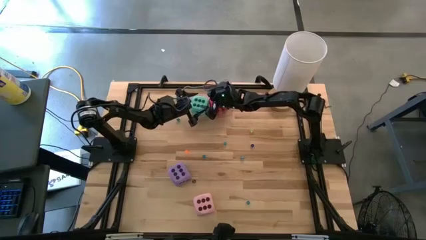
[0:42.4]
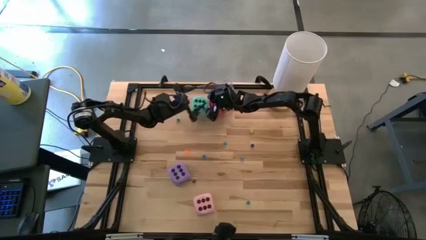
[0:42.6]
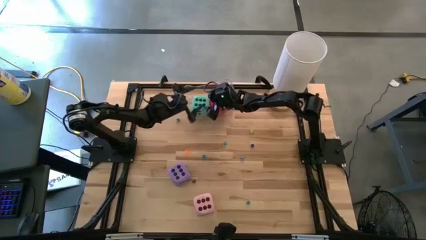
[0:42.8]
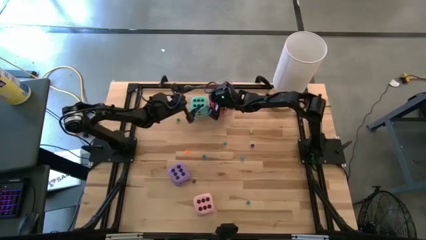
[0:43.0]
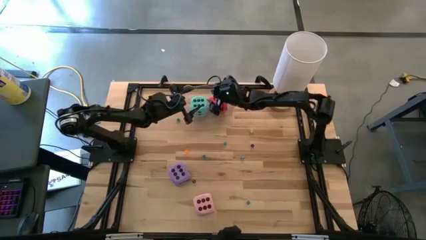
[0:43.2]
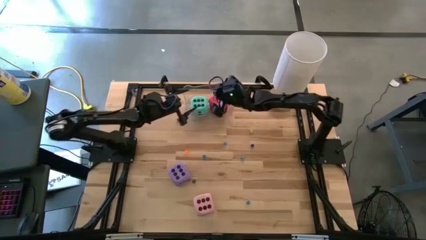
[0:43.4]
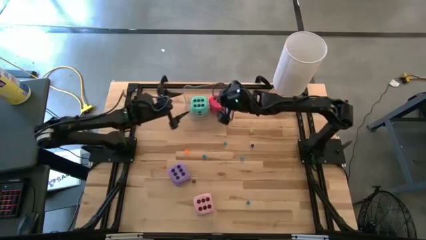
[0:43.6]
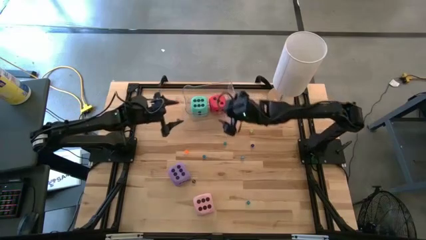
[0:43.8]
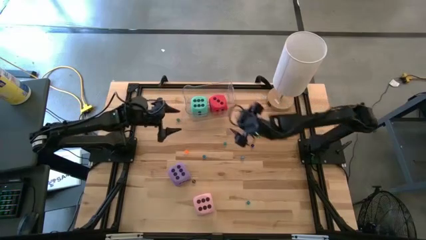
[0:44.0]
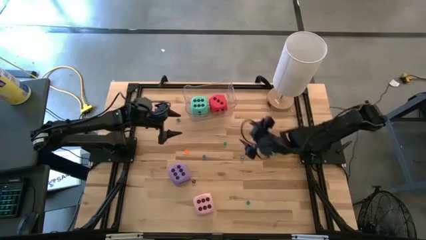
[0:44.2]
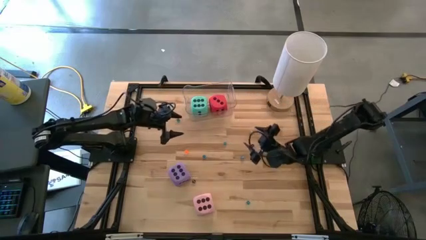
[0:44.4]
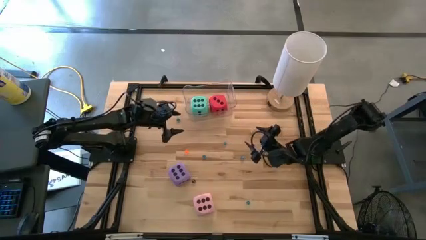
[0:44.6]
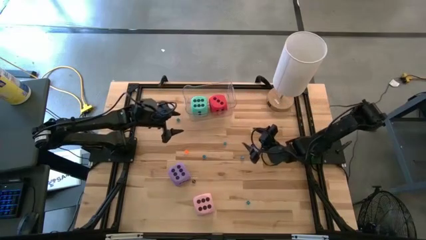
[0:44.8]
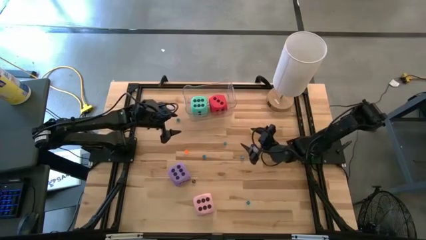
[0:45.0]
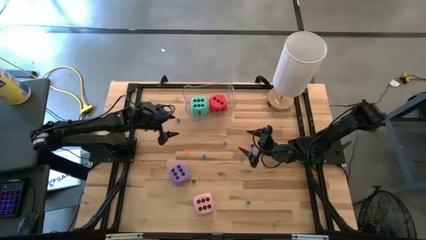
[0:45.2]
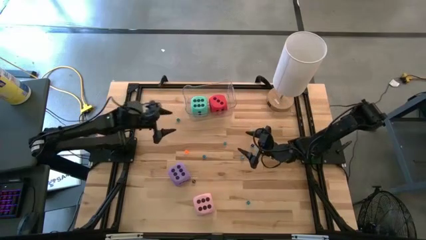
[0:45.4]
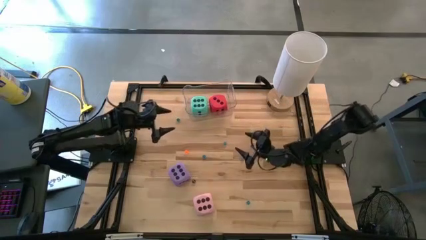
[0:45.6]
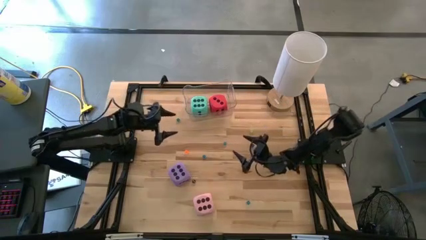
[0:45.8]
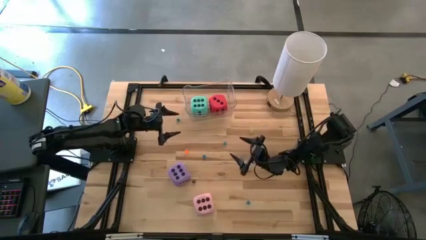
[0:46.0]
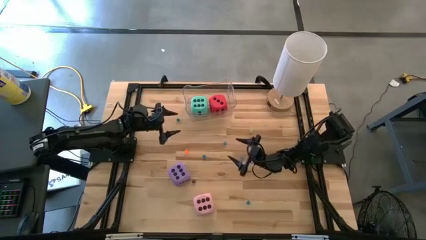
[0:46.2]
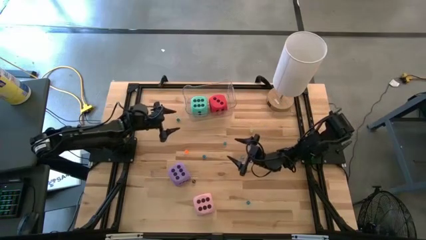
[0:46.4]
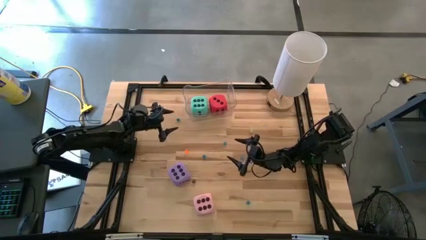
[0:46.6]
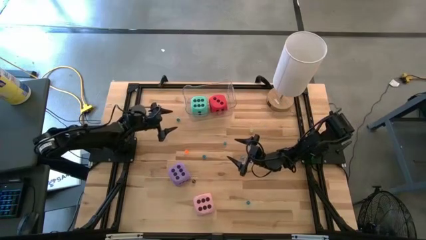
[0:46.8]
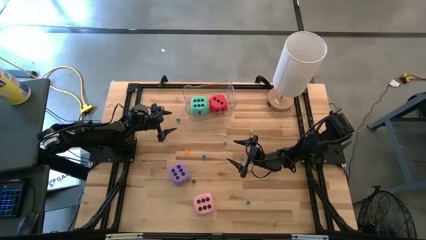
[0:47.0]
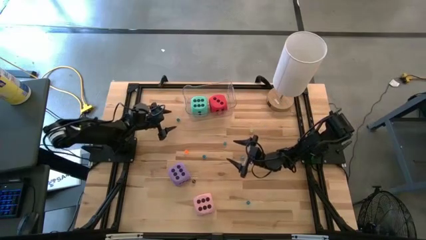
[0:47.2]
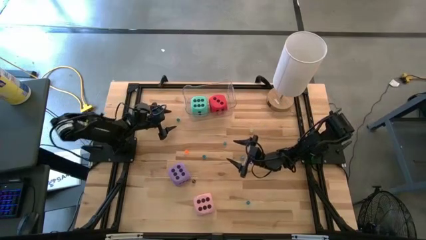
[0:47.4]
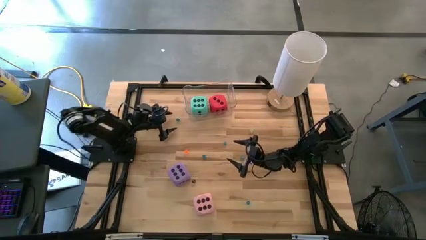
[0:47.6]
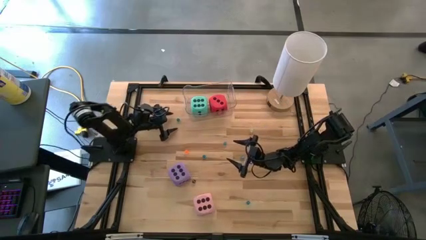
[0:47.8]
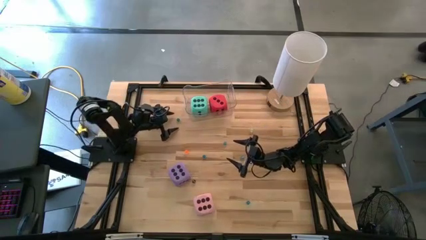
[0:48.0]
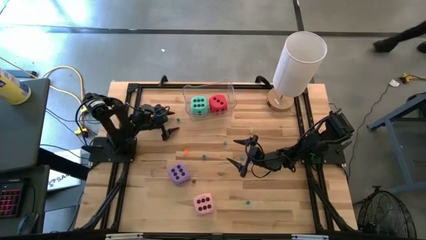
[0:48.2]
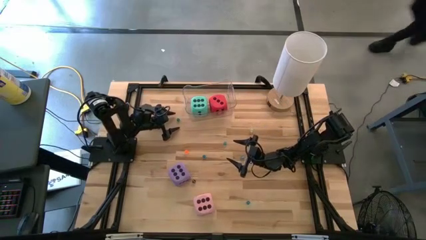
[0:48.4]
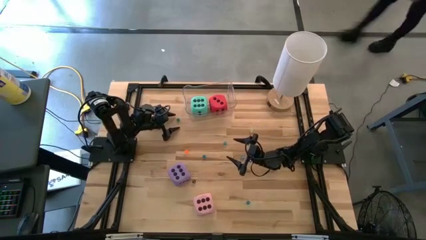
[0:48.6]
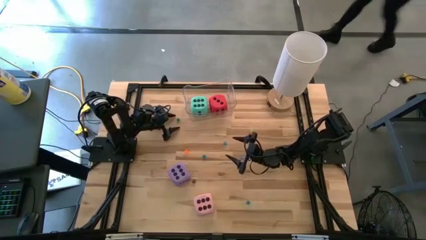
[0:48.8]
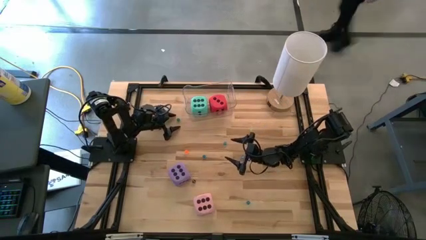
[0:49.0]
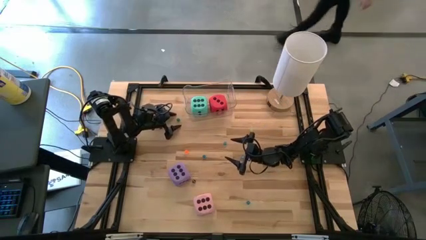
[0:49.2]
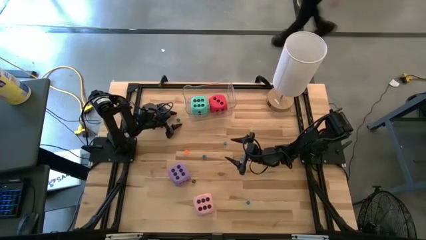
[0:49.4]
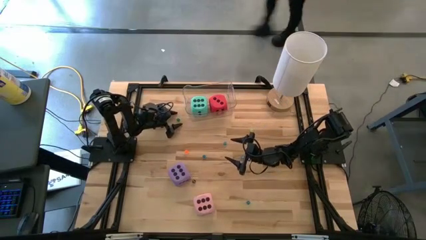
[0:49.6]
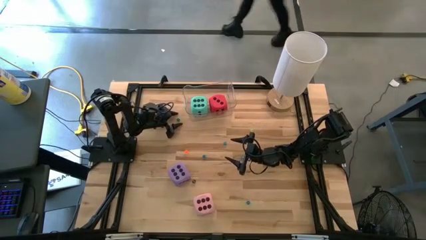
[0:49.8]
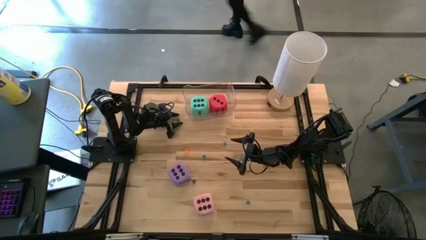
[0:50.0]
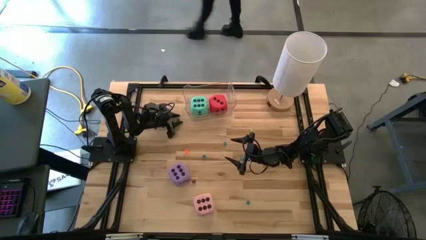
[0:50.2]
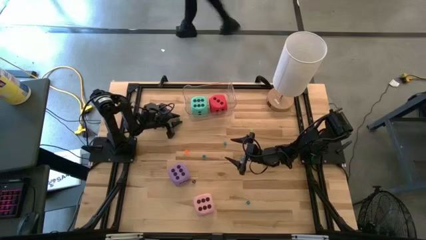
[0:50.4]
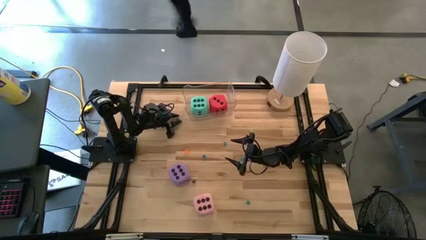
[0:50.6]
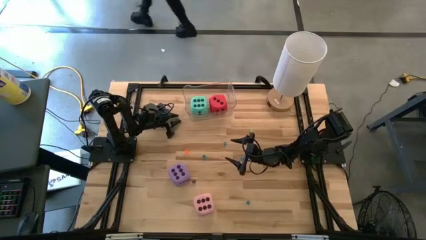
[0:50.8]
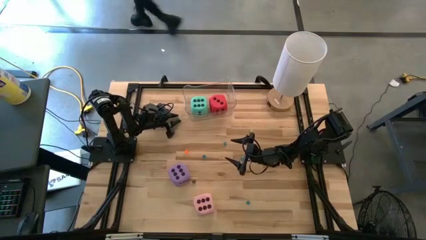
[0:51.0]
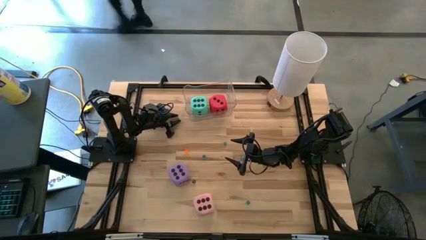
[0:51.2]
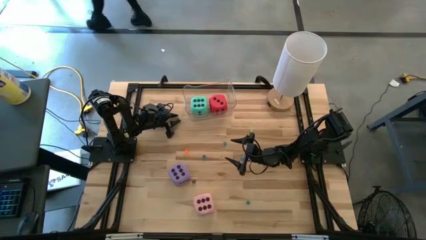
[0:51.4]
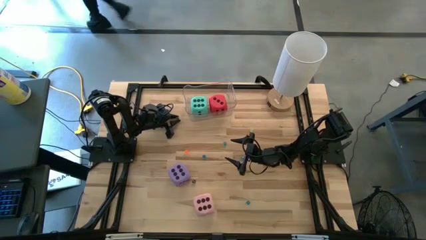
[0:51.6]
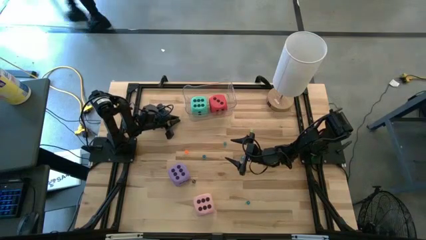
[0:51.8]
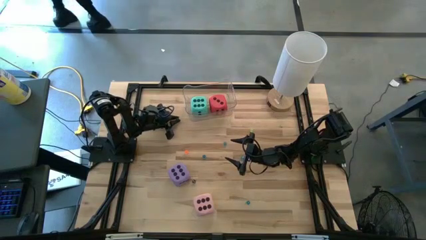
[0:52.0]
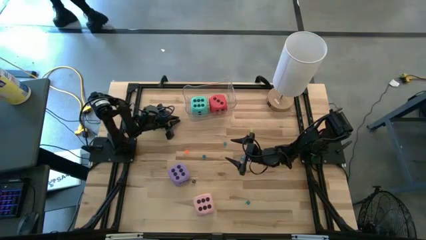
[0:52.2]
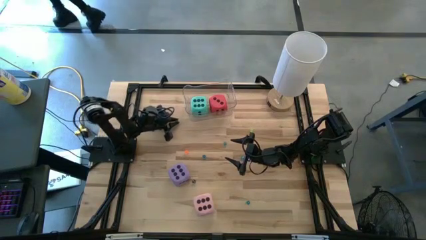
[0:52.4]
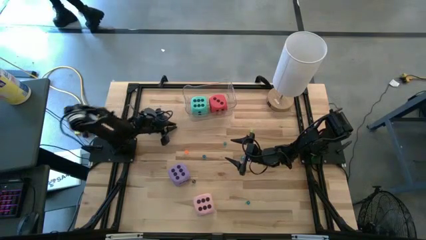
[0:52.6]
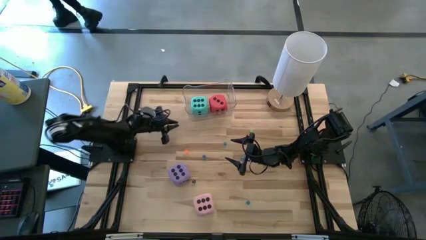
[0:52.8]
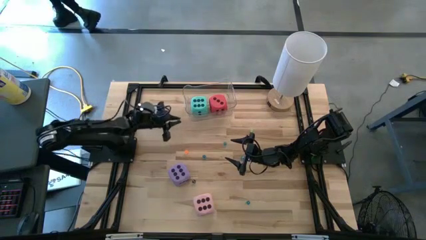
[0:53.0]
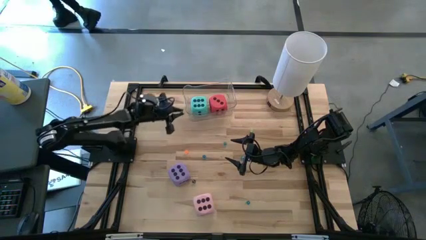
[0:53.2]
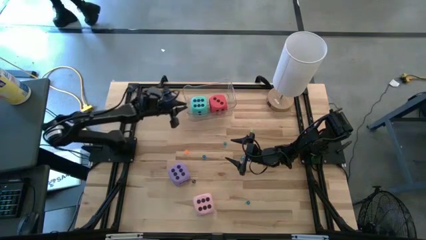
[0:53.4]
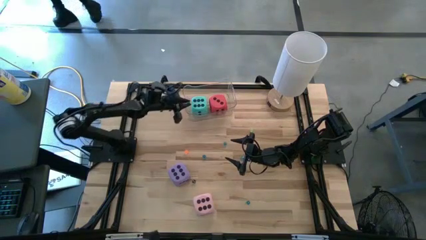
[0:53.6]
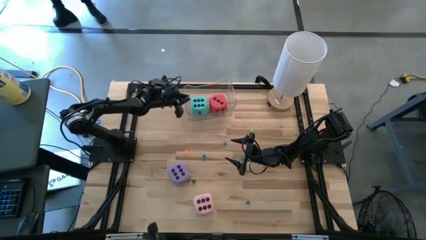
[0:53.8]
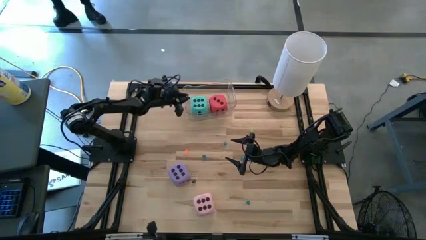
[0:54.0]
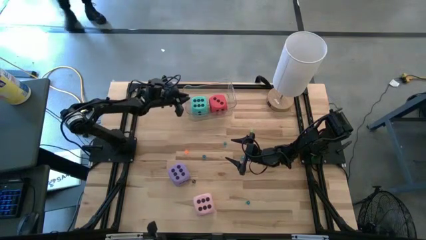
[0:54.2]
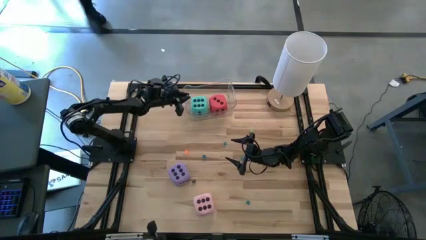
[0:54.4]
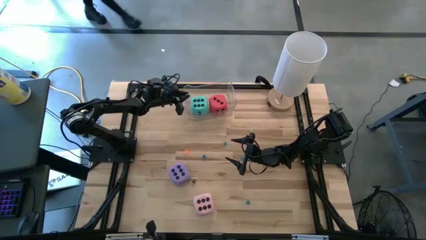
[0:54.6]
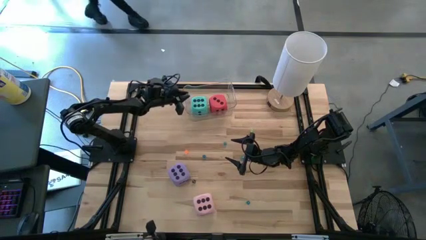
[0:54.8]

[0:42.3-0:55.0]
Task: Pick & Place Dice
Put the small dark green dice in the transparent bin

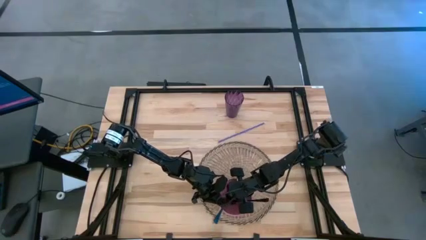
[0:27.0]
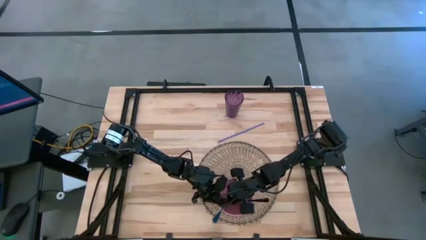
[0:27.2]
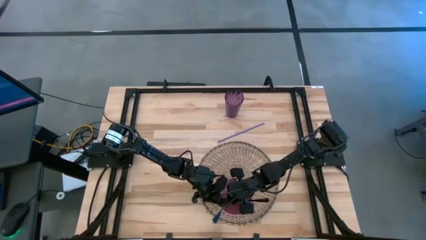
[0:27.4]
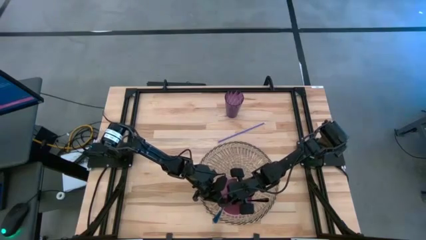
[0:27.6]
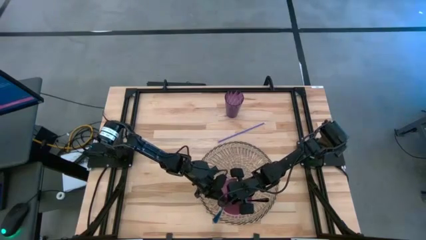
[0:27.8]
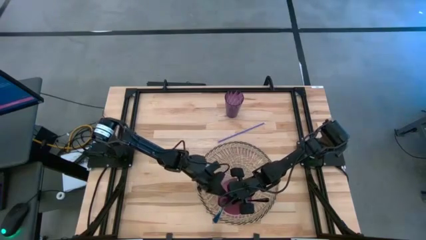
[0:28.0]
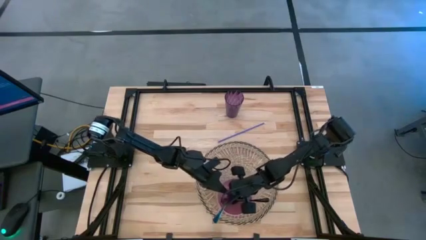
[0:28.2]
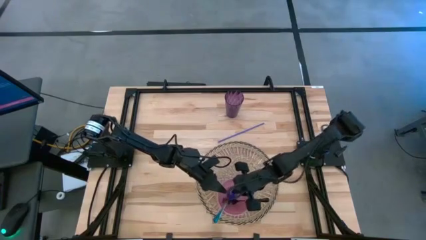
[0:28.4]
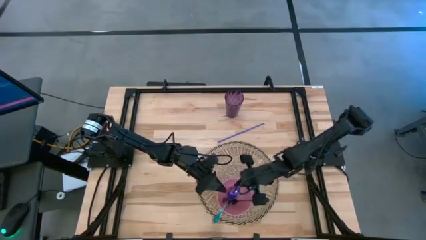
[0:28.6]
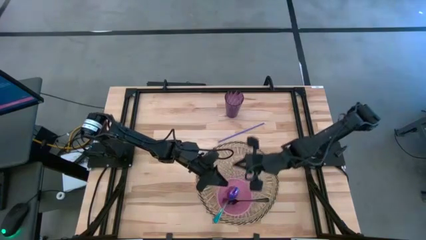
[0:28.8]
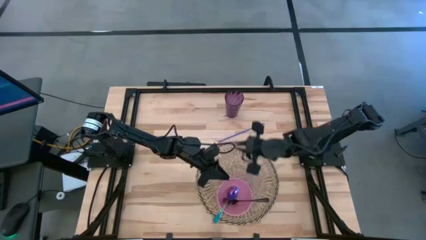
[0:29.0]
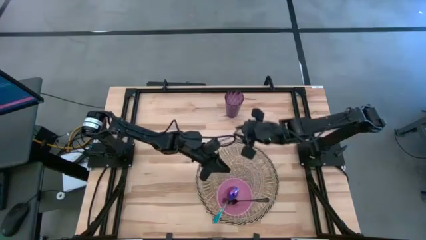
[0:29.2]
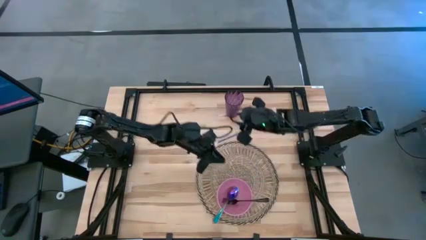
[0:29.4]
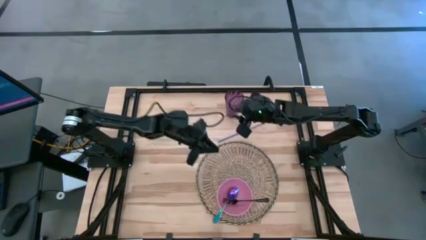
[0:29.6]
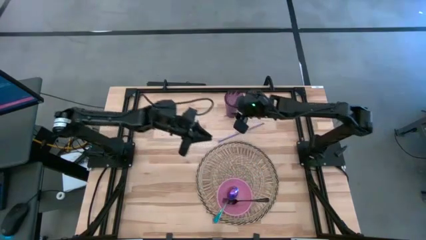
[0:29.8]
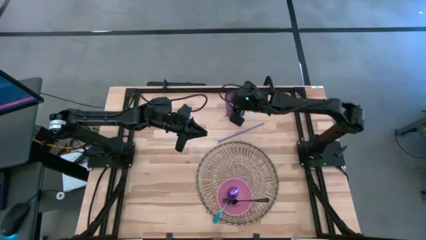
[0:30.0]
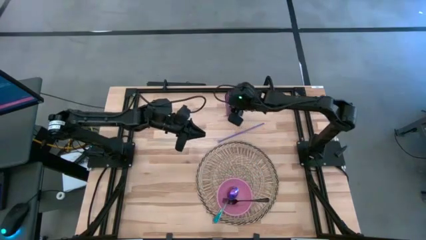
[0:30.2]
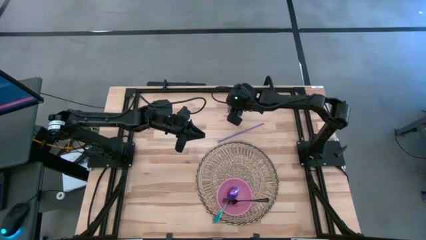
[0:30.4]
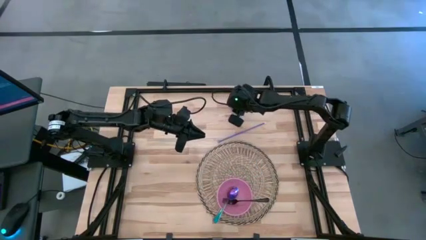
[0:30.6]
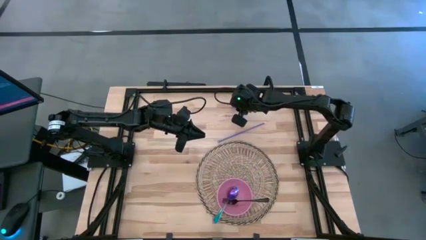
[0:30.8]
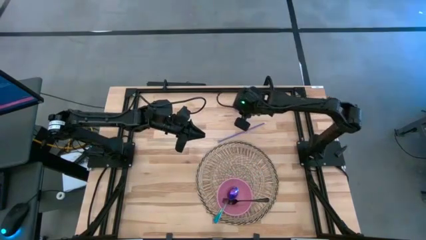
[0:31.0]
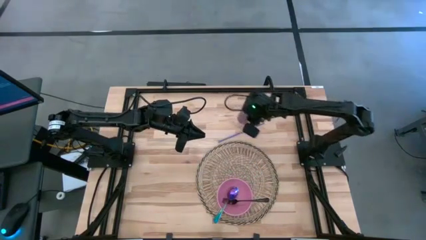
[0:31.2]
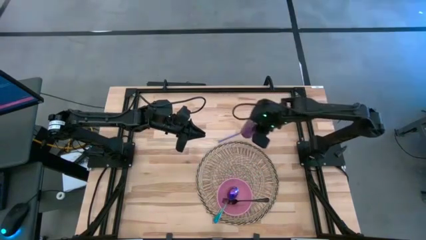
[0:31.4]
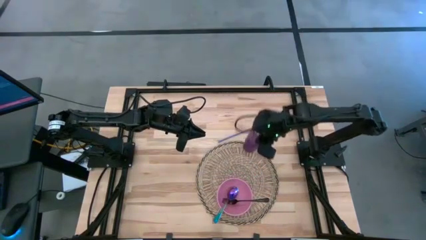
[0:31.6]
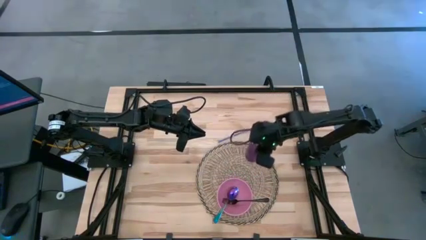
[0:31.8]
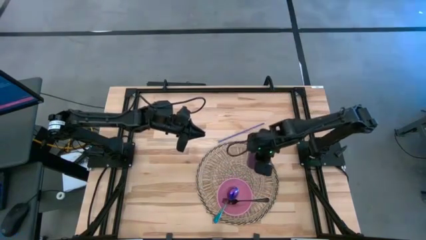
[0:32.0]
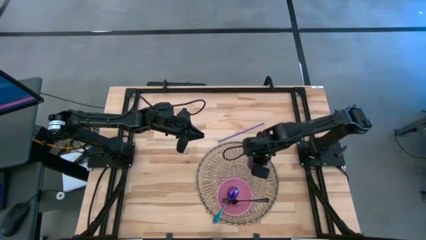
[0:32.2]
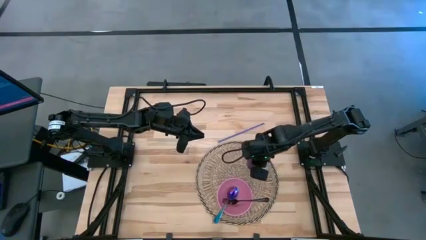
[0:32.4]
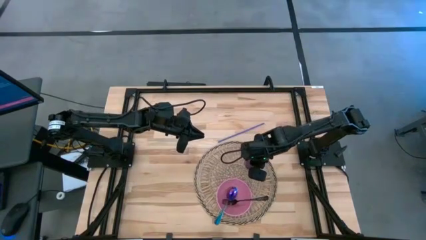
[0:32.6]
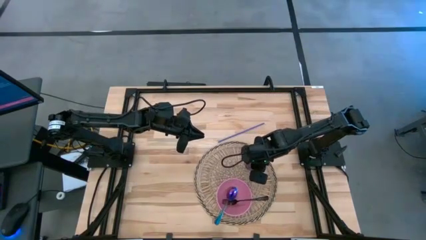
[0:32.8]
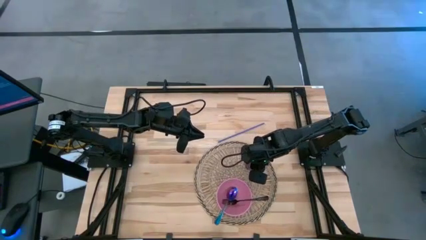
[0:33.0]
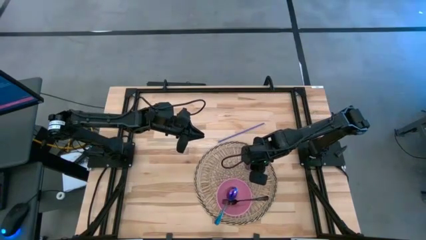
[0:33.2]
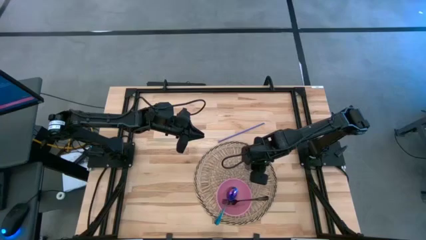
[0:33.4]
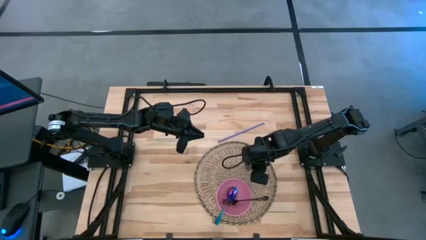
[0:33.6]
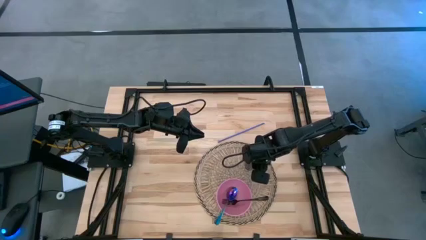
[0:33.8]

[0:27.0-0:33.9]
Task: Pick & Place Utensil
Put the violet cup on the woven mat to the top left of the pink bowl
